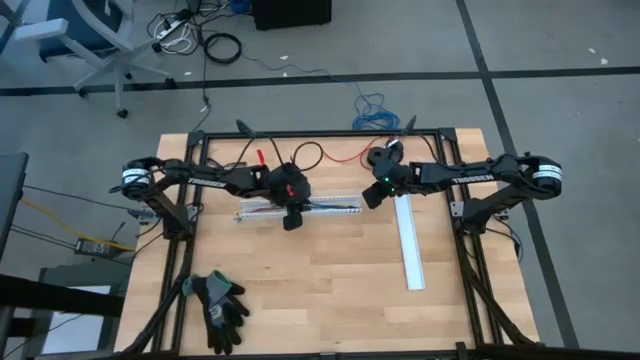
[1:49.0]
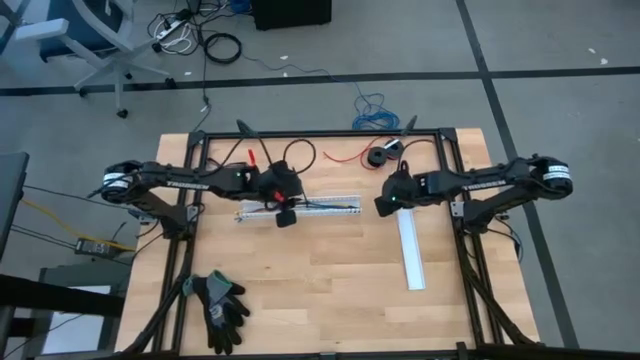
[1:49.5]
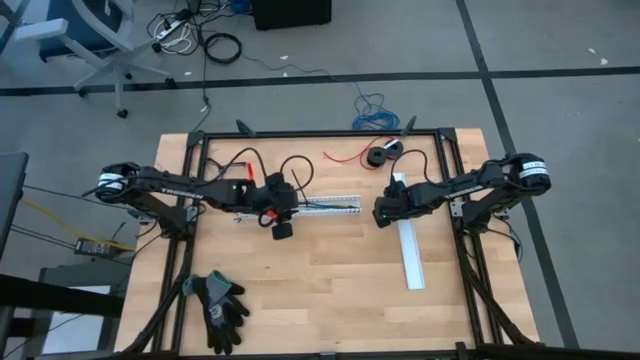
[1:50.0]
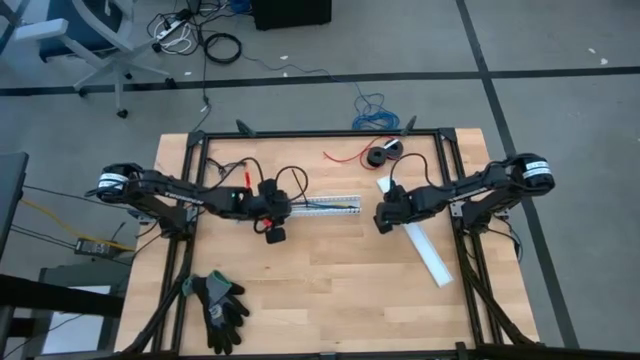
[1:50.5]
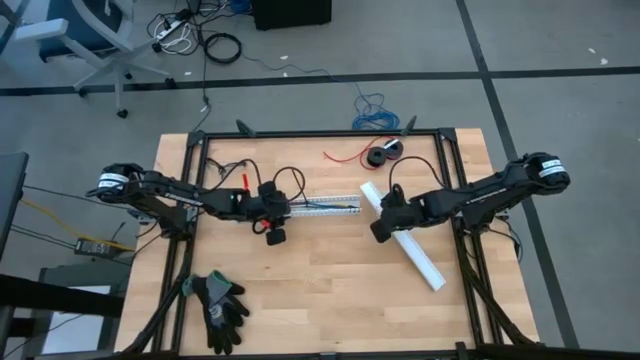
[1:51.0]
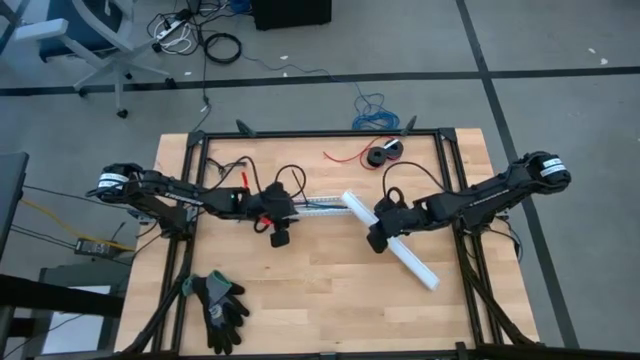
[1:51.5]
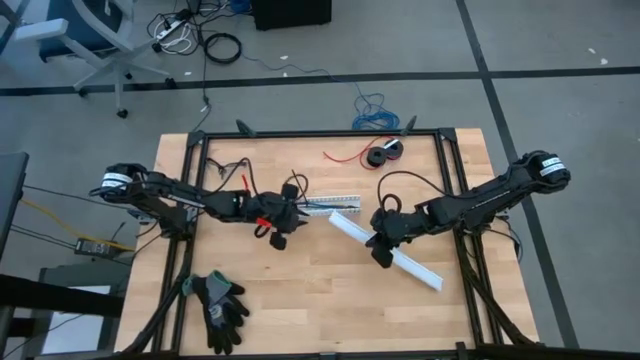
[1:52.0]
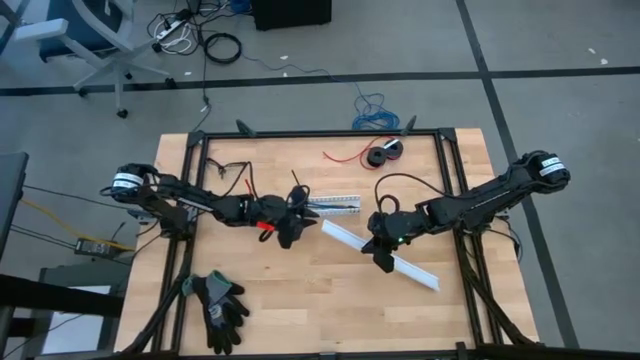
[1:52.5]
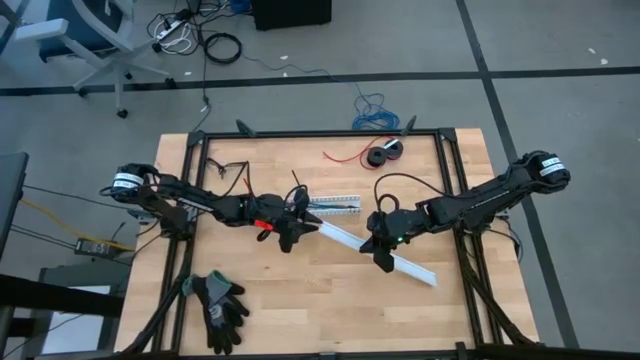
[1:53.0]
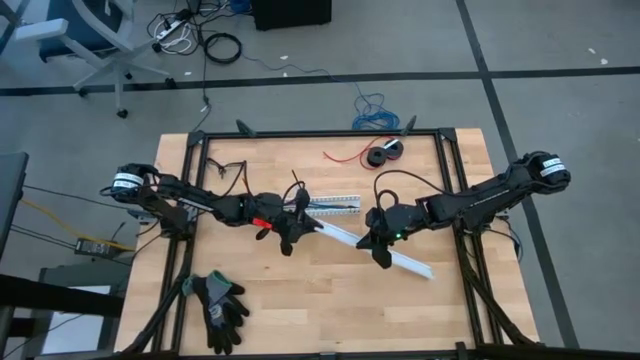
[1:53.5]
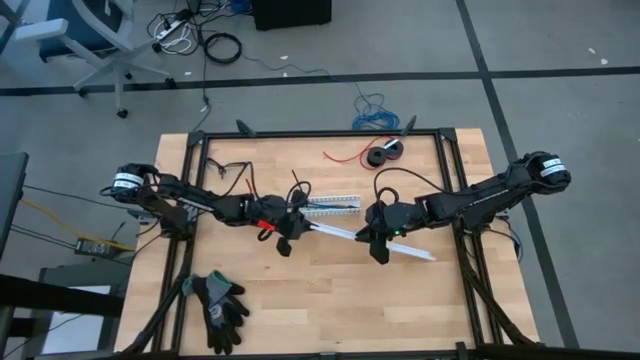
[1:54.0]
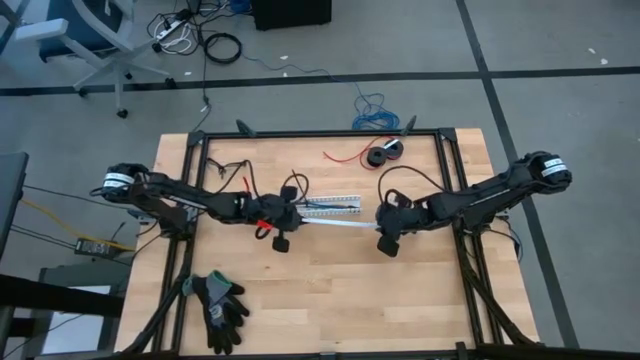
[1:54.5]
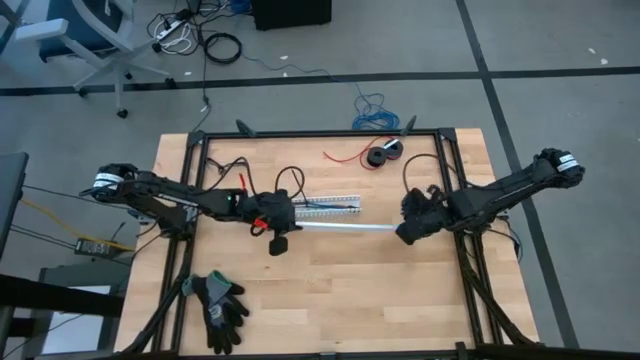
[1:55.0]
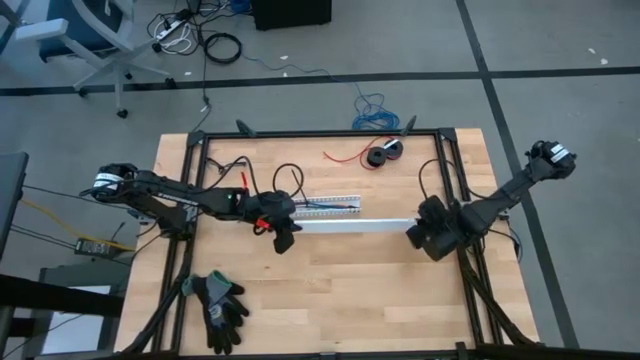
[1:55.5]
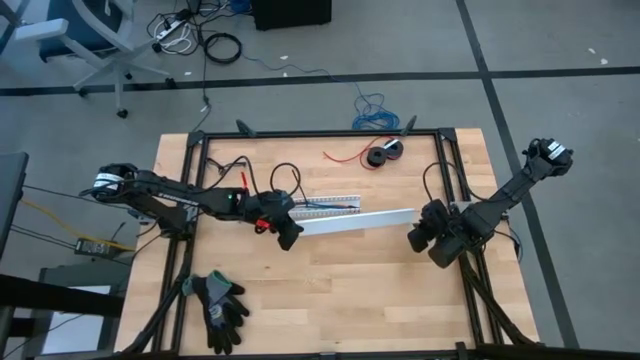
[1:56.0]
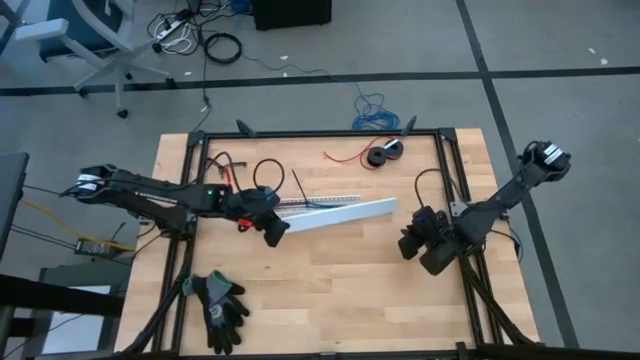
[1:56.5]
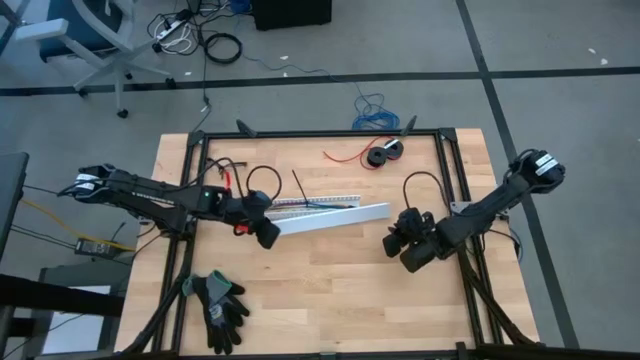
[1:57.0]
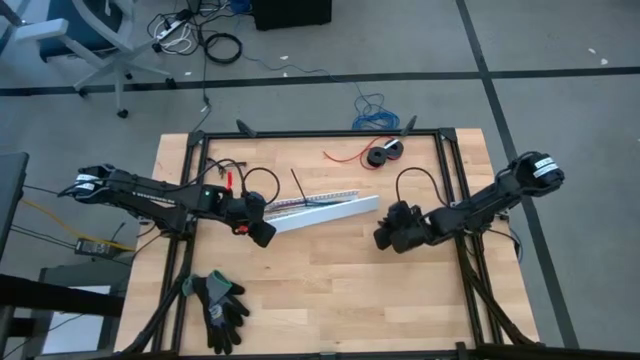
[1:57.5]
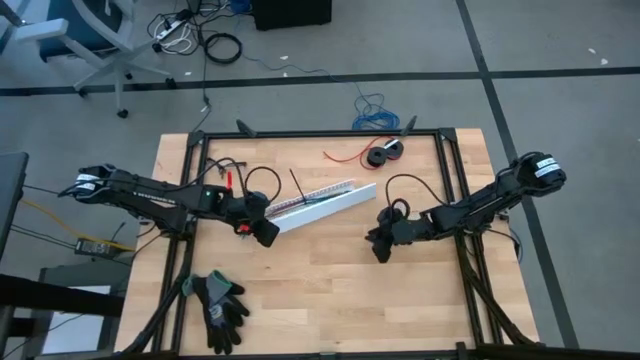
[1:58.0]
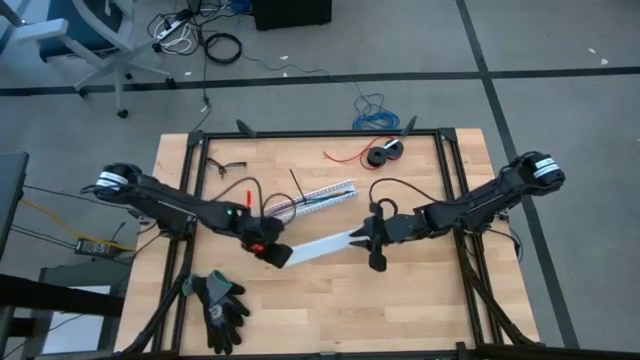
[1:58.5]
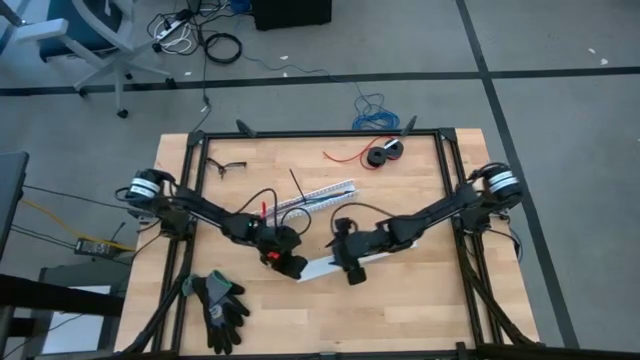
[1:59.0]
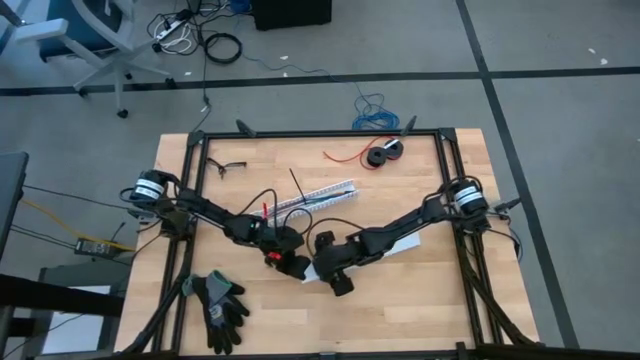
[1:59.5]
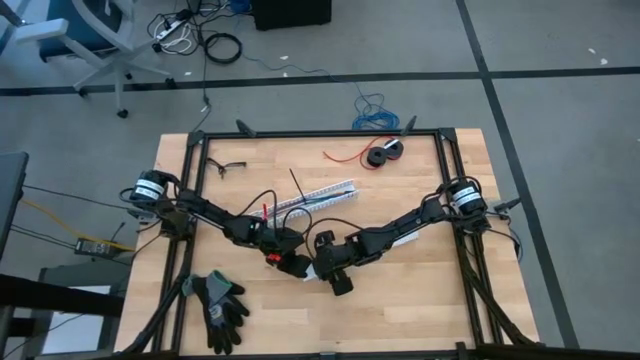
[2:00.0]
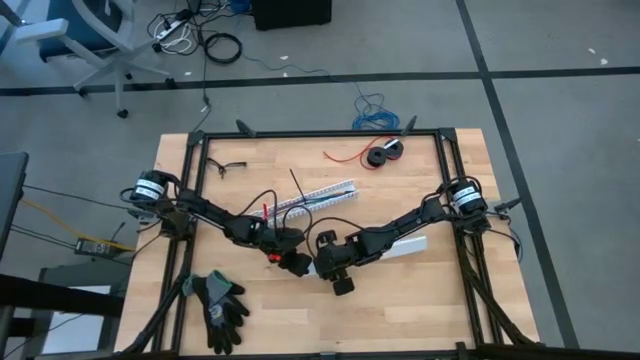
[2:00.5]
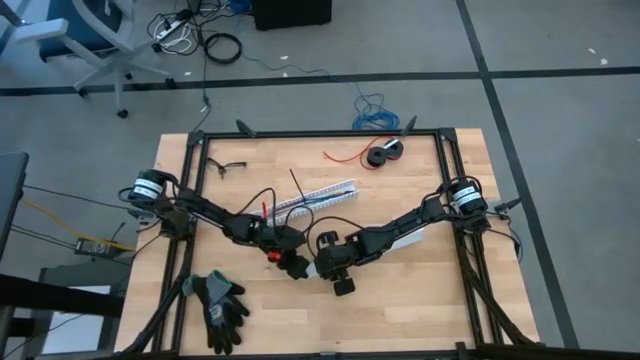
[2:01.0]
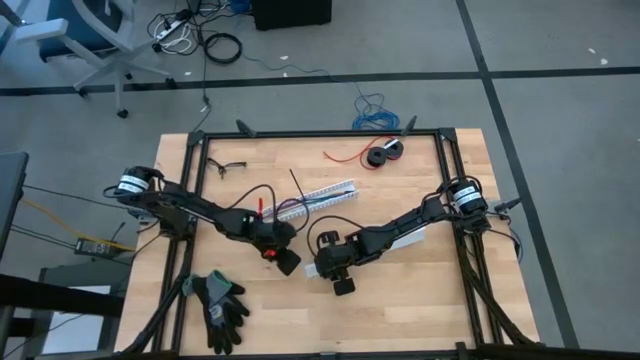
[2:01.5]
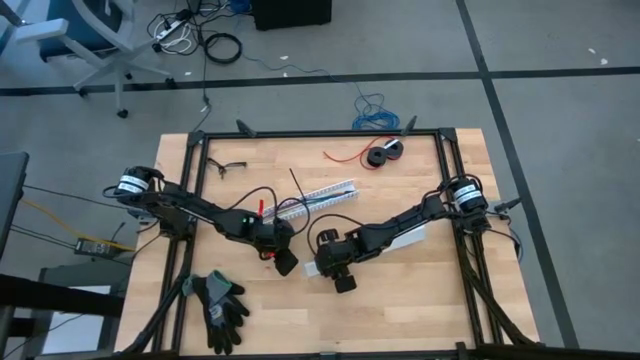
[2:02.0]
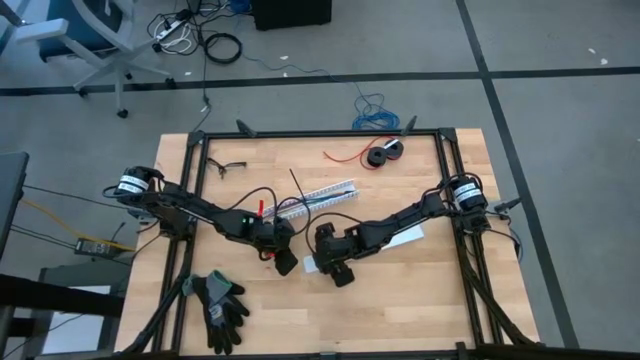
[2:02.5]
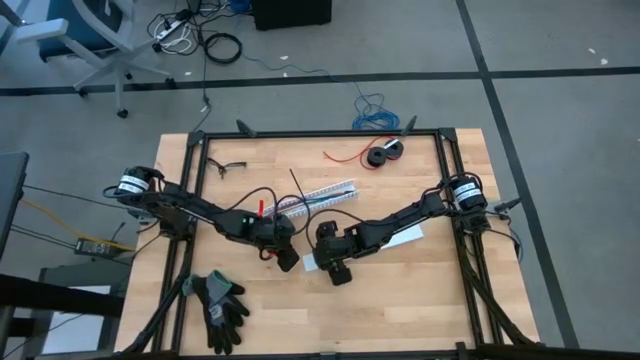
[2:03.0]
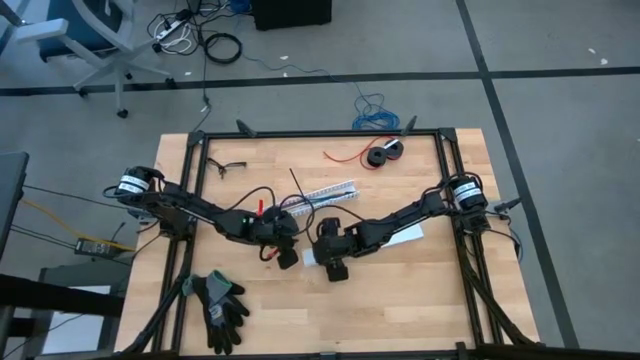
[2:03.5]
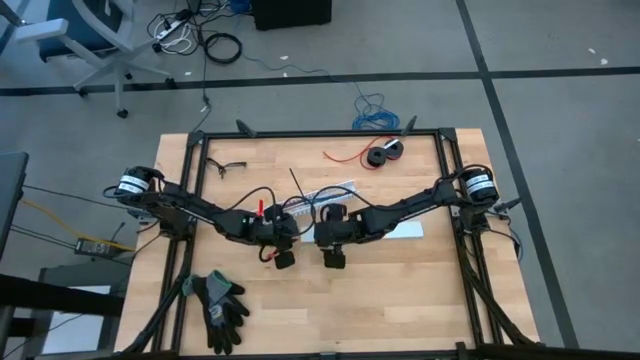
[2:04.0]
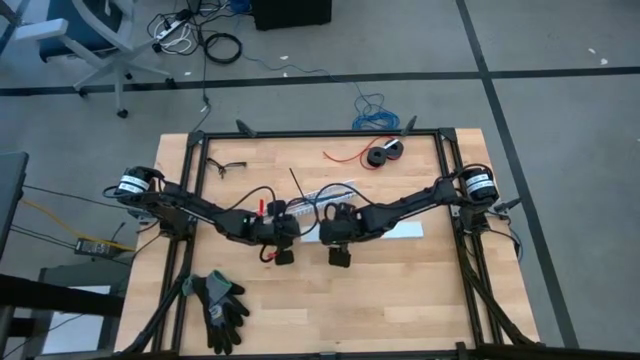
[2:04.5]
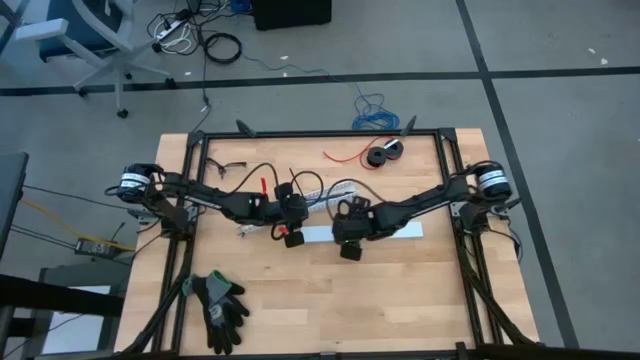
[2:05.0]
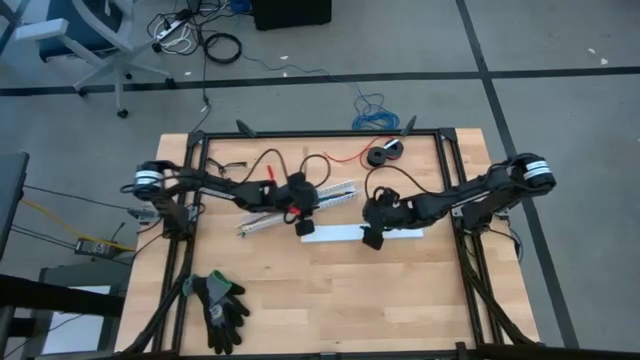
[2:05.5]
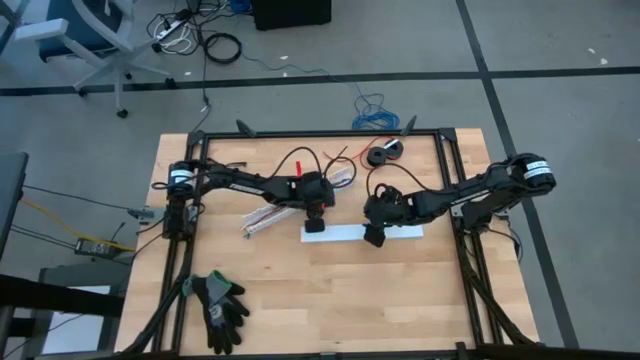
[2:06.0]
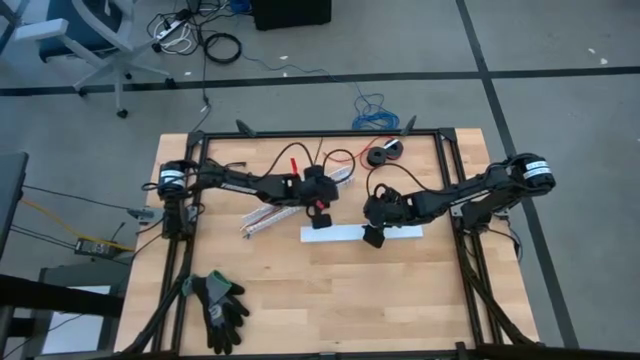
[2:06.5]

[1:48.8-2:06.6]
Task: Ziptie cables
Close the white cable duct cover
